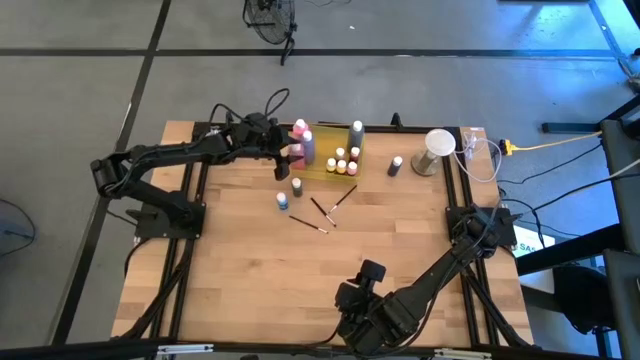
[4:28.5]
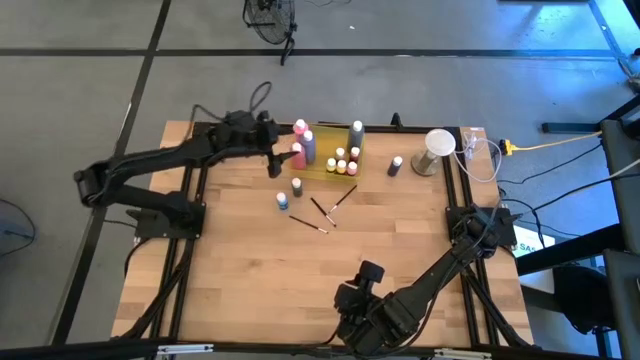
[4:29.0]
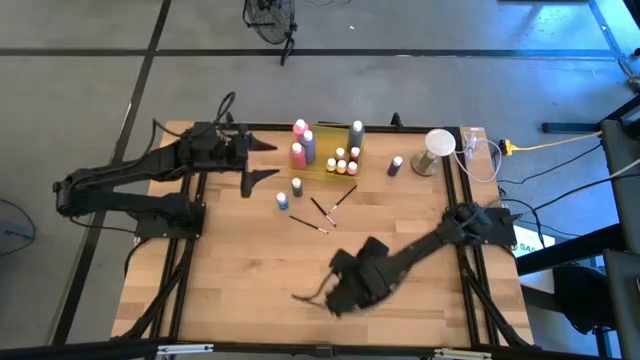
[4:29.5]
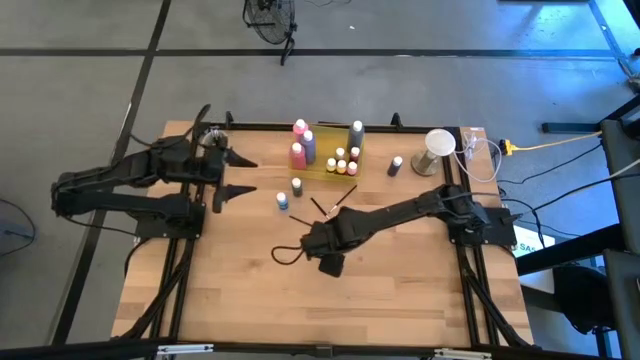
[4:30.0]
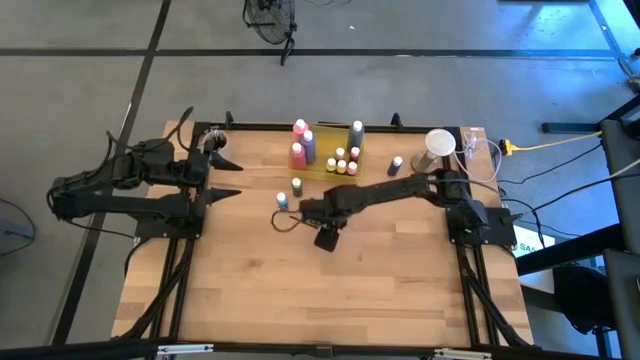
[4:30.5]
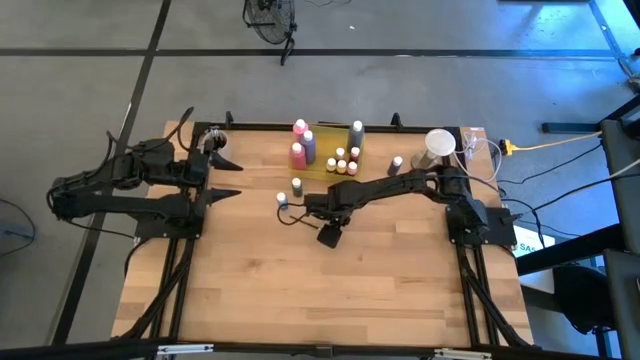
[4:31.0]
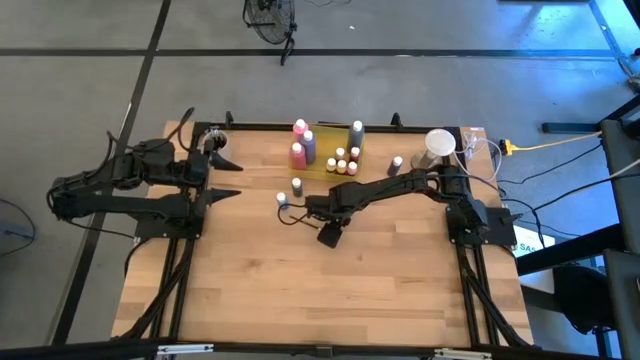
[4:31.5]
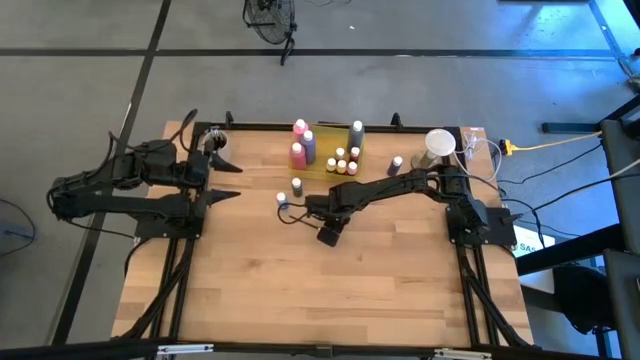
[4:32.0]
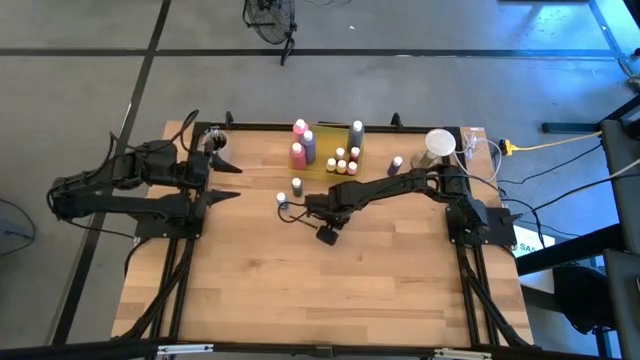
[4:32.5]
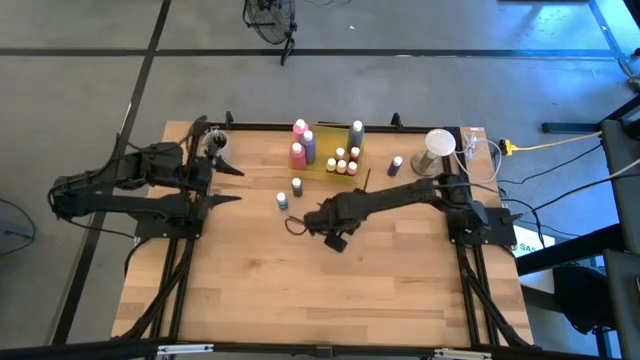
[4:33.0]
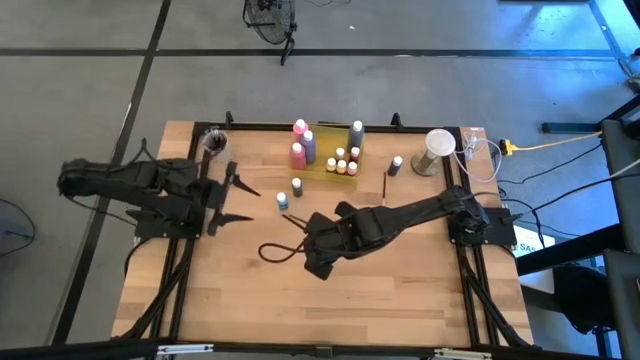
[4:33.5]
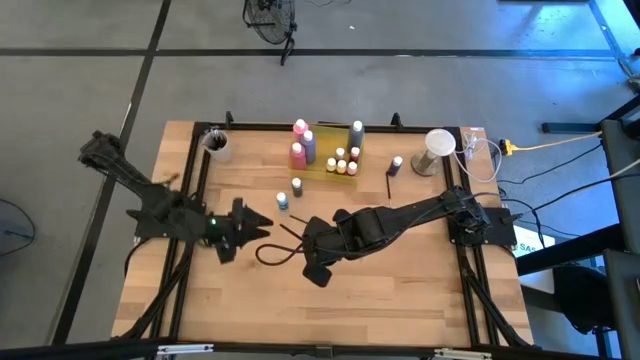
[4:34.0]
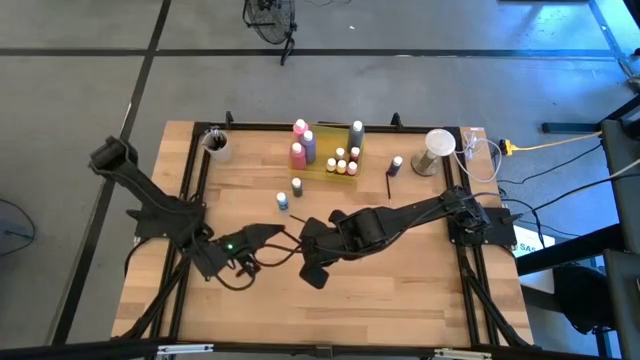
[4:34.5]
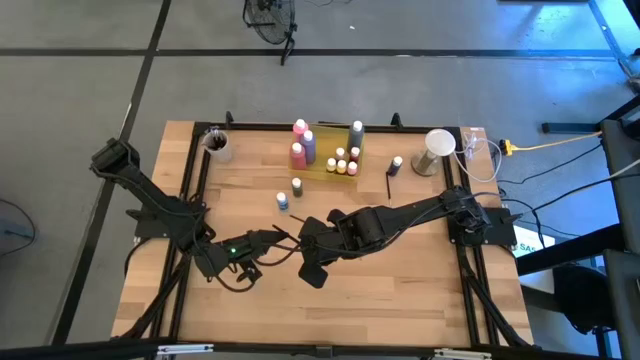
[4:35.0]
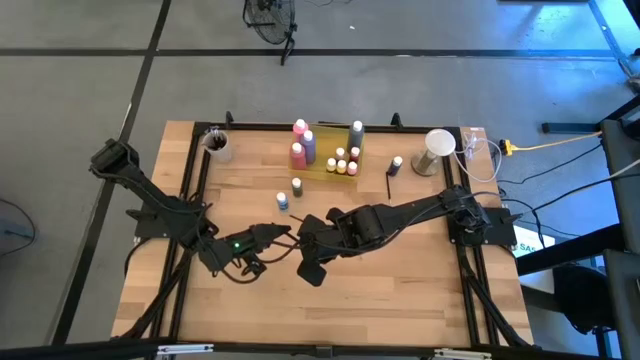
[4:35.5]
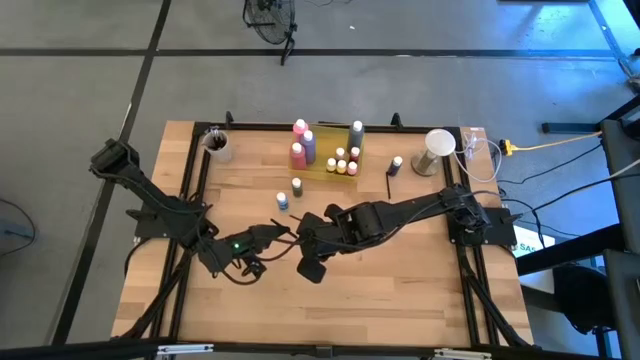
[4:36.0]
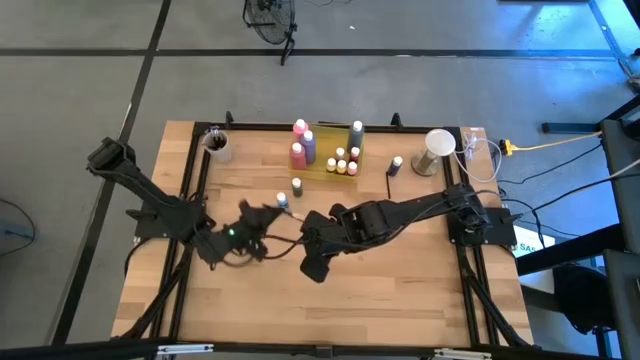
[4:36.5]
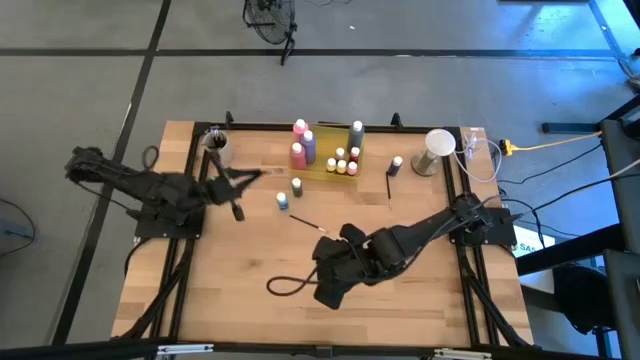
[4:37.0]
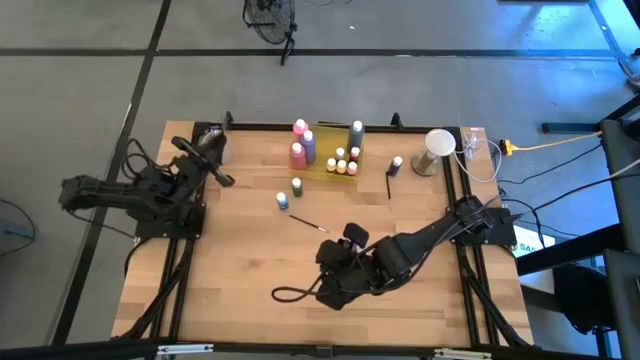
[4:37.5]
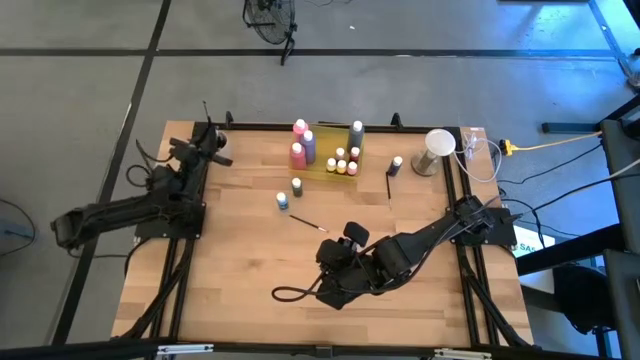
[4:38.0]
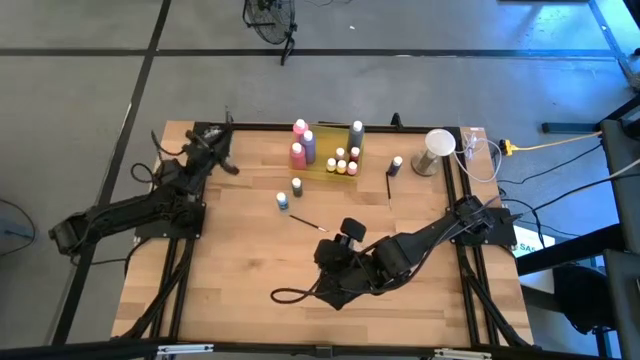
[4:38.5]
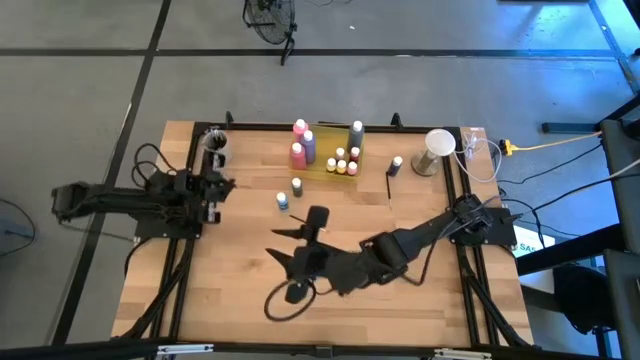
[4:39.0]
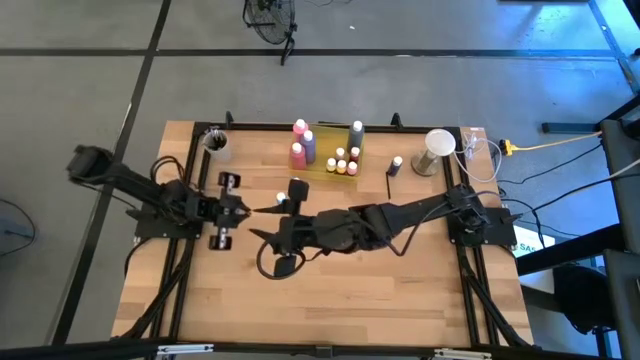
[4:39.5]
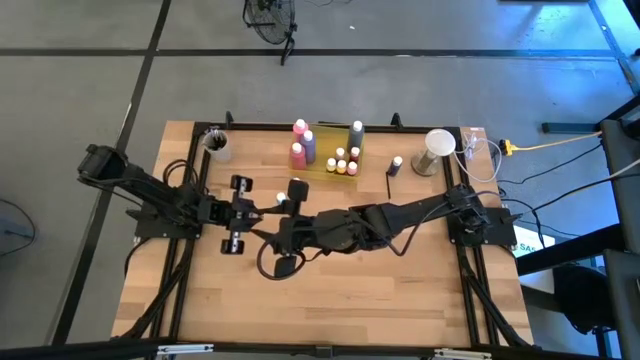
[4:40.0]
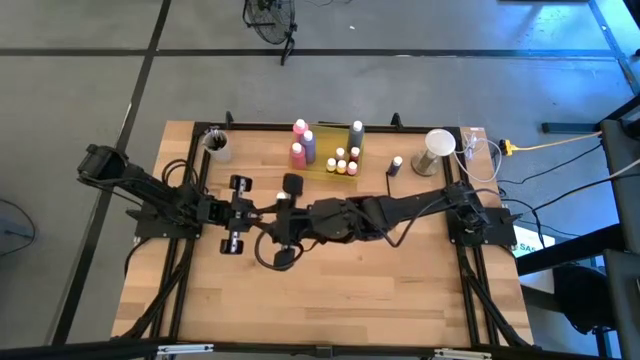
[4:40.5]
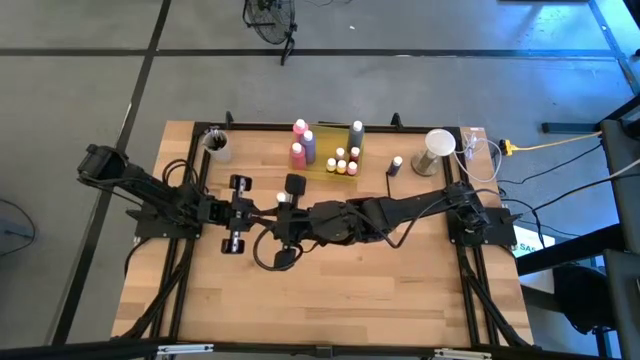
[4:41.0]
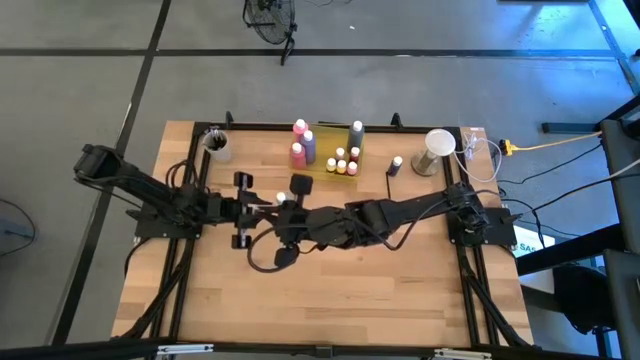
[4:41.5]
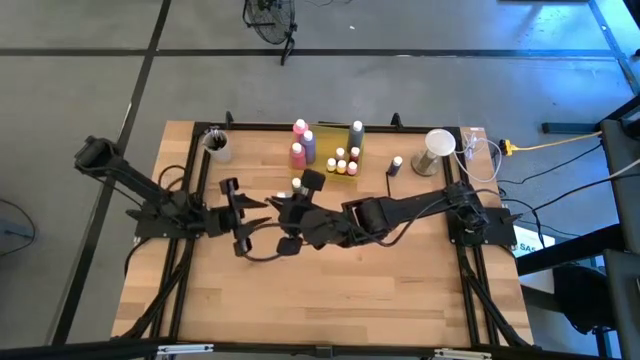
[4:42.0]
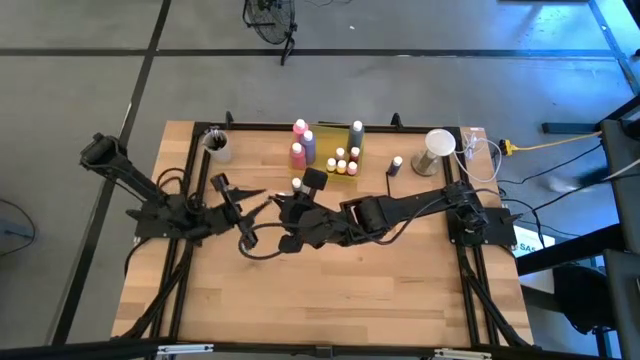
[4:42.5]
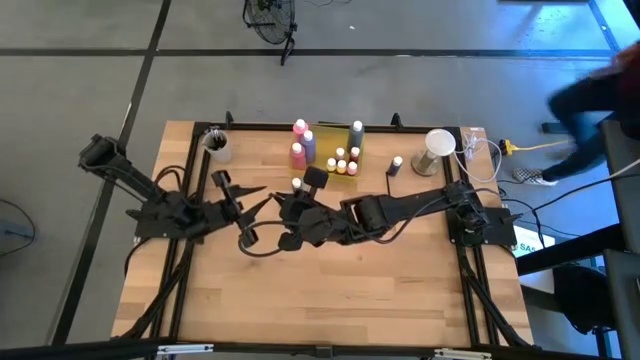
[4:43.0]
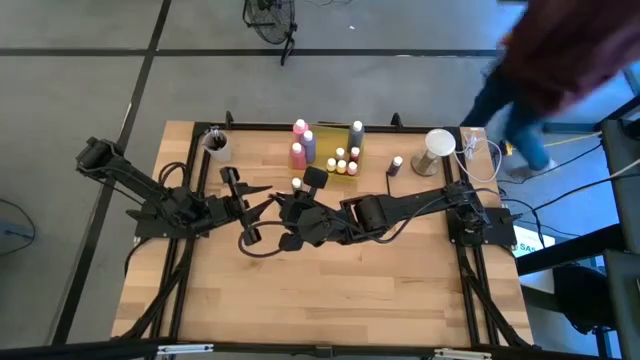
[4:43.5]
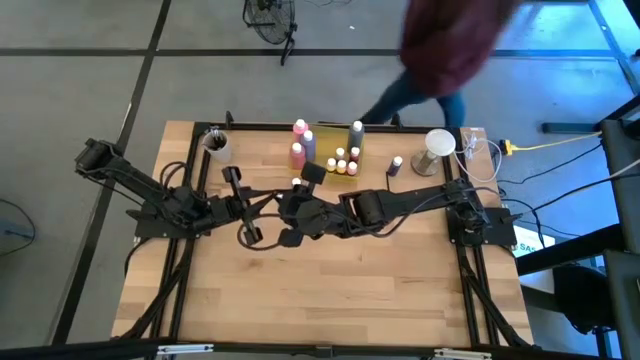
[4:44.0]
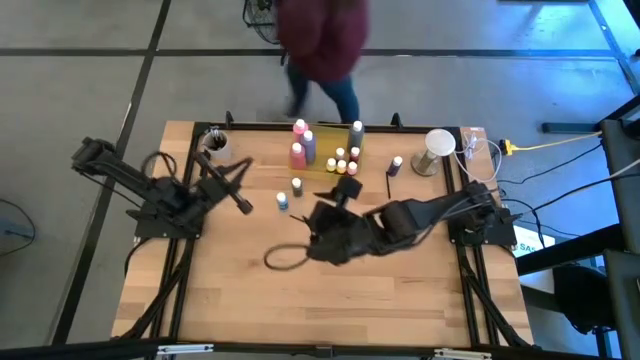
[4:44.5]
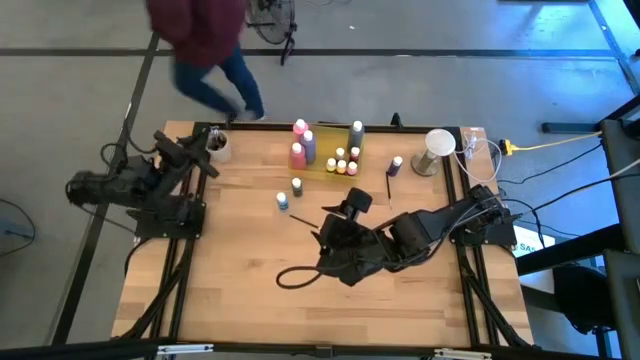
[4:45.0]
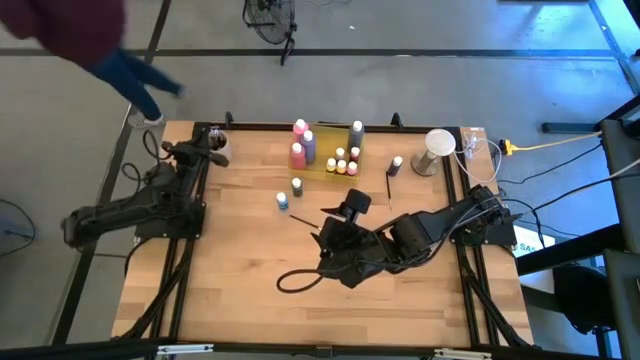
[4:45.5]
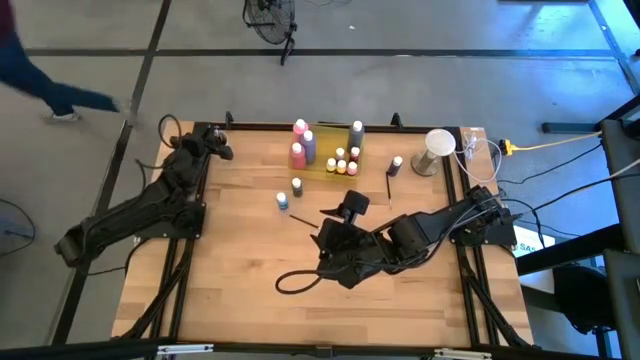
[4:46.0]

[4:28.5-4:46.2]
Task: Pick & Place Paint Supplies
Put the silver paintbrush into the white cup

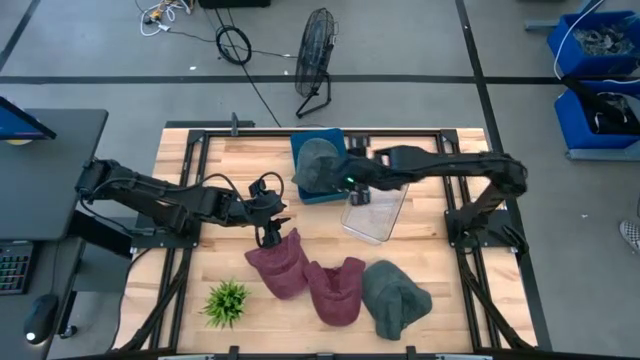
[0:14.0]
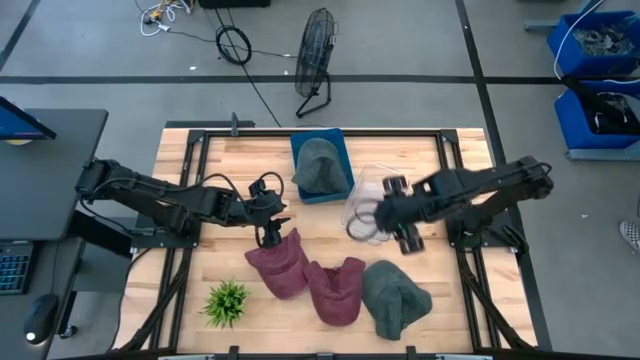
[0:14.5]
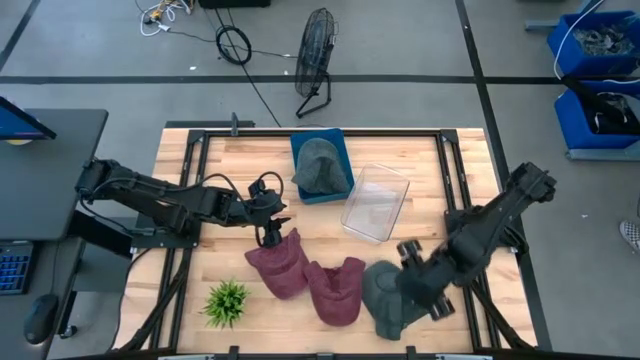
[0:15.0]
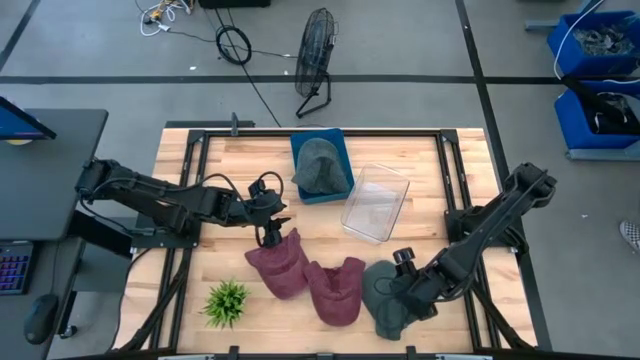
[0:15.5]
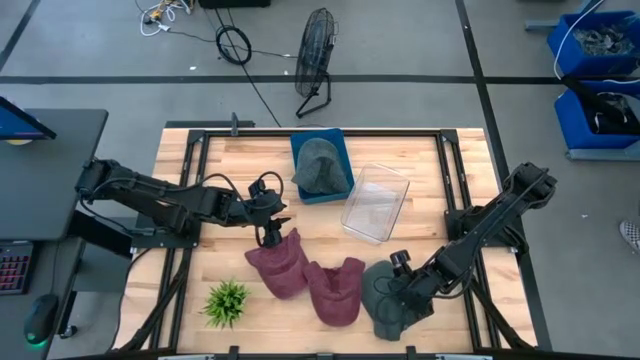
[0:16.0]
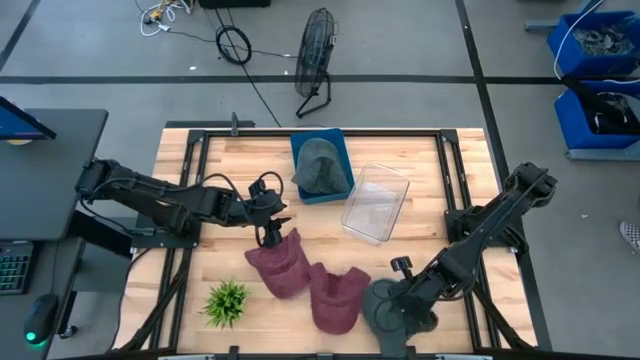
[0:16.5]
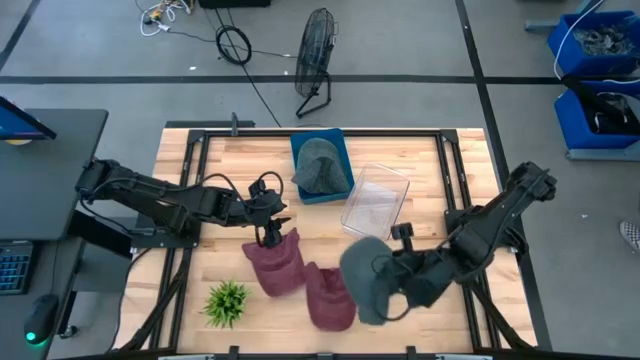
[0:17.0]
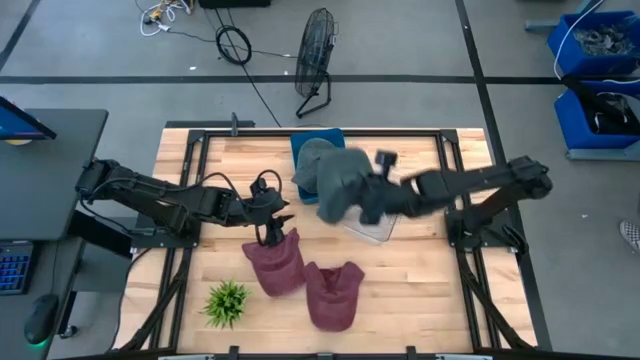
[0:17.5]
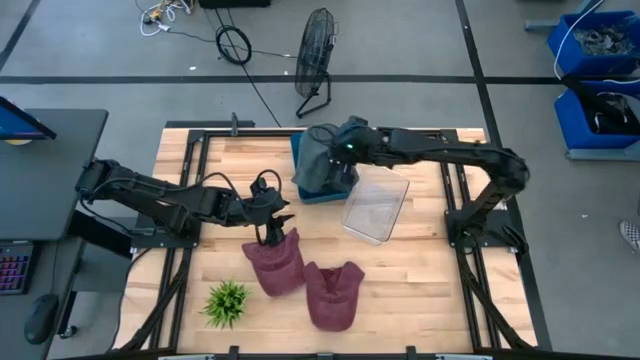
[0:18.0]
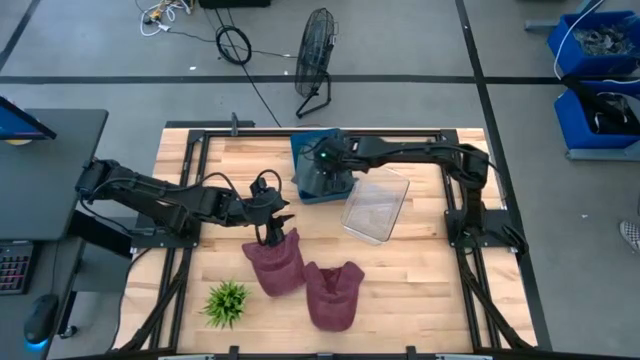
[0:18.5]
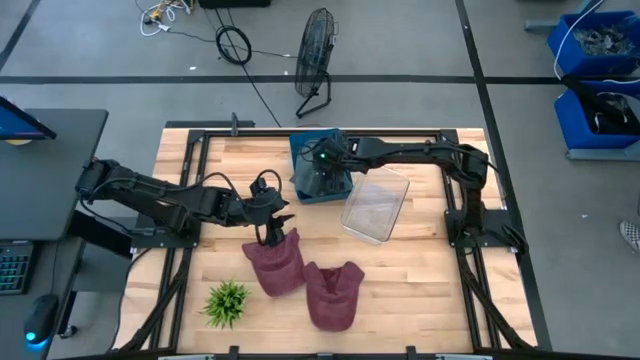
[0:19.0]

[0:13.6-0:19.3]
Task: Pick & Place hat
Put the gray cap into the blue bin
